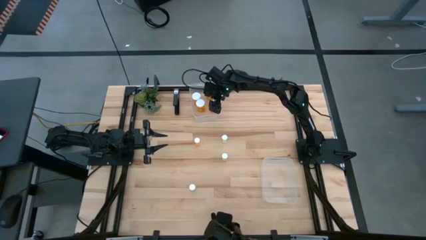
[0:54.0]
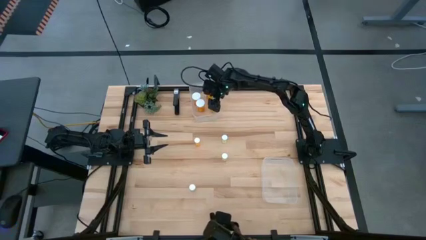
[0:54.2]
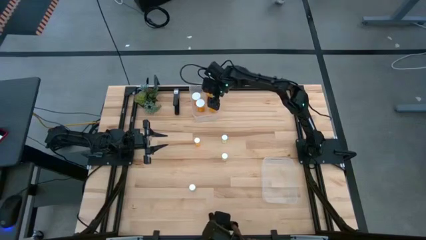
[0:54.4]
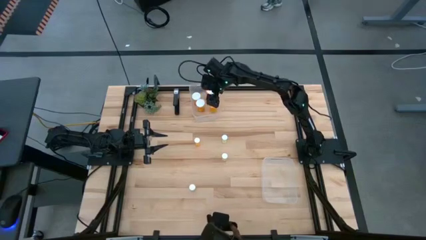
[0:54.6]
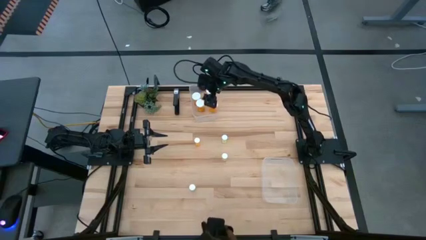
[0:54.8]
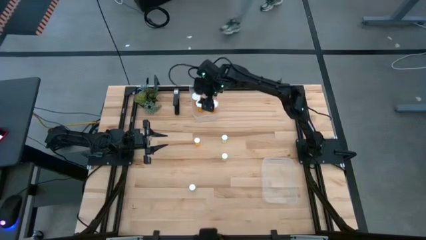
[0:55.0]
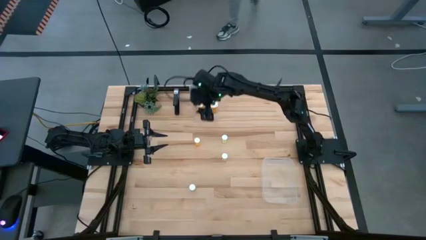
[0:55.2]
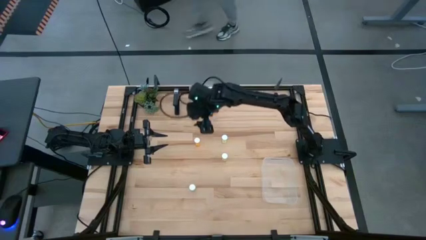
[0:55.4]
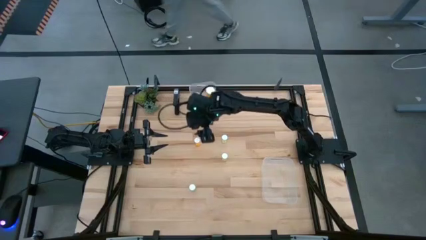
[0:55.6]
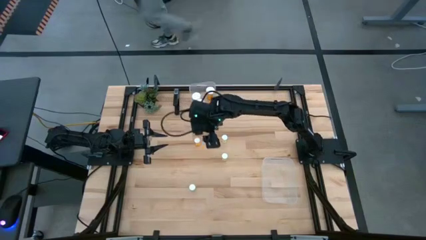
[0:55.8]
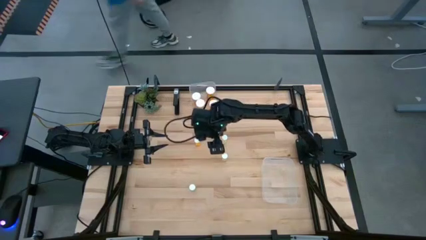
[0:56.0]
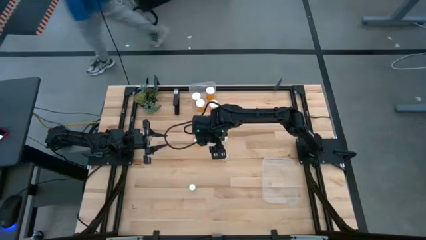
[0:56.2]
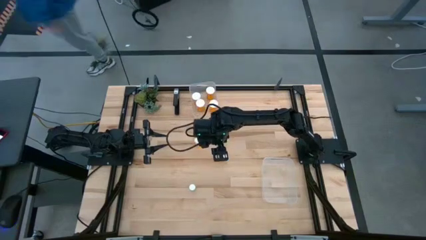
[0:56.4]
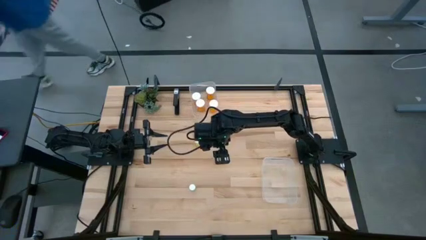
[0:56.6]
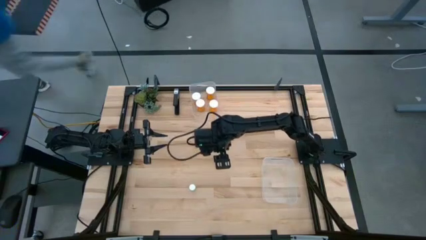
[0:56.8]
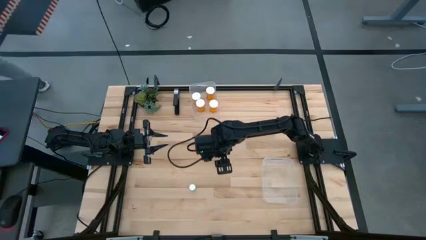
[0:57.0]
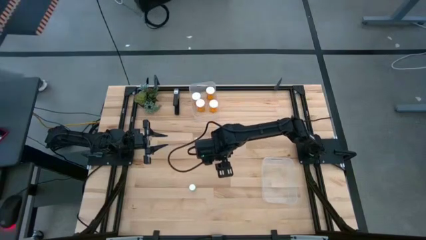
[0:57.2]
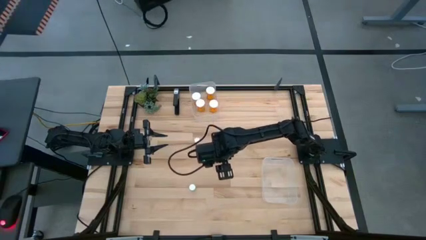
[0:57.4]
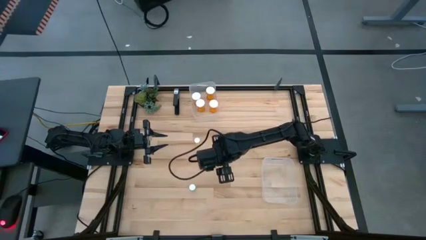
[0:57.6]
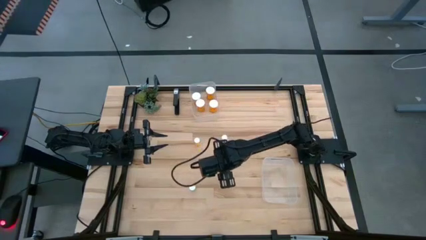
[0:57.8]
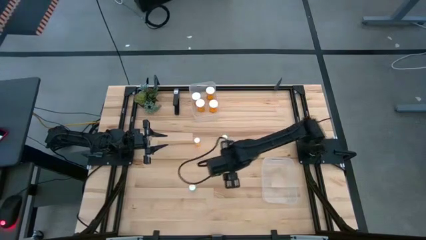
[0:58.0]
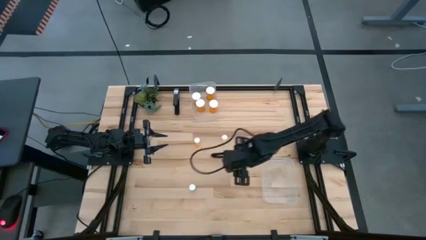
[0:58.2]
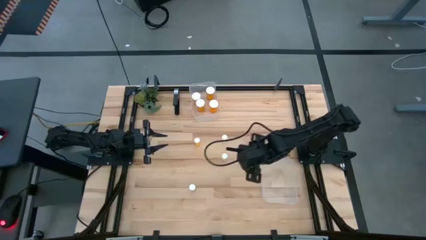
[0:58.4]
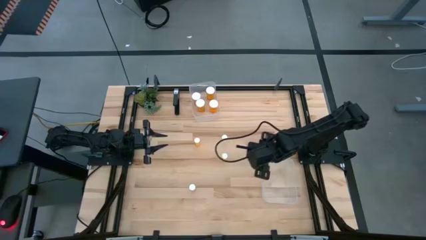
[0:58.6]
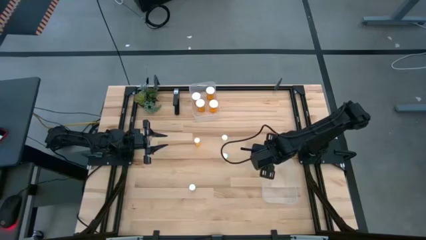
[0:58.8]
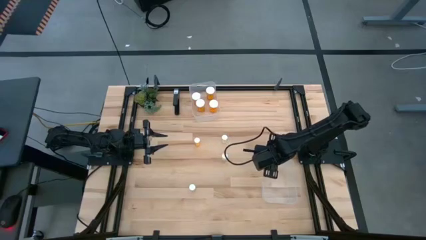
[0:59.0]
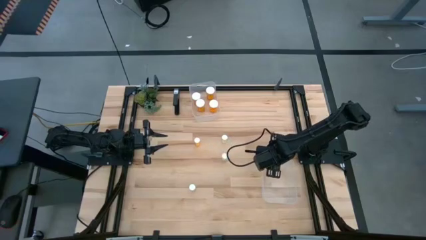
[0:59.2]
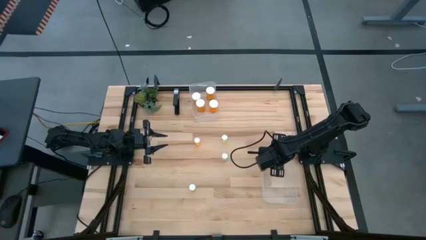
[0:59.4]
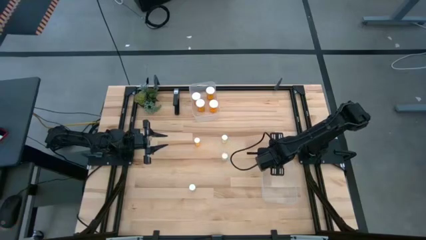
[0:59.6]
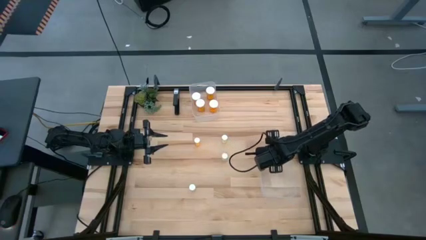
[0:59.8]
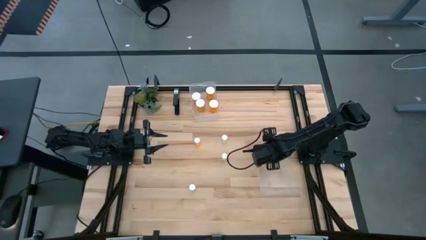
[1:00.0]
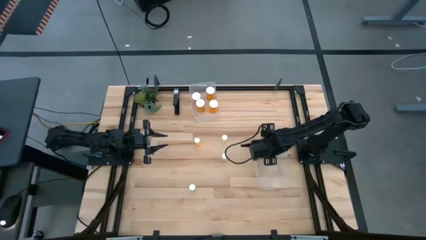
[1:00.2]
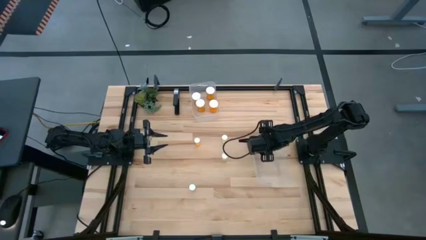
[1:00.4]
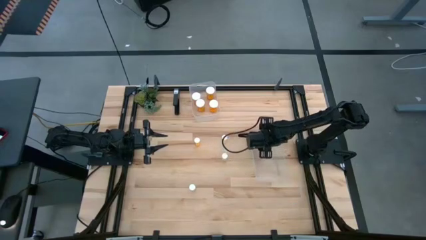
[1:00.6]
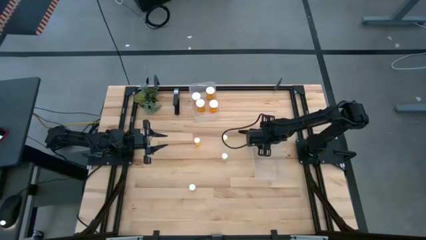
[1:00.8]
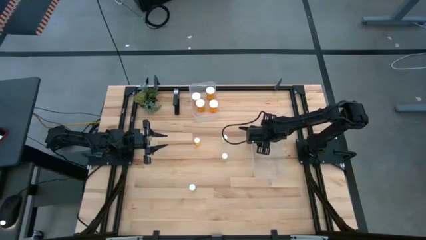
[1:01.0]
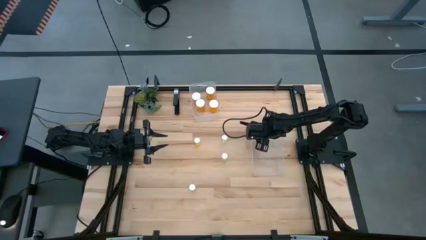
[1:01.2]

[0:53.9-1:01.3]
Task: Pick and place medicine bottles into bin by pill shape (circle, oval)
Move the bottom transparent bin to the middle right of the table
